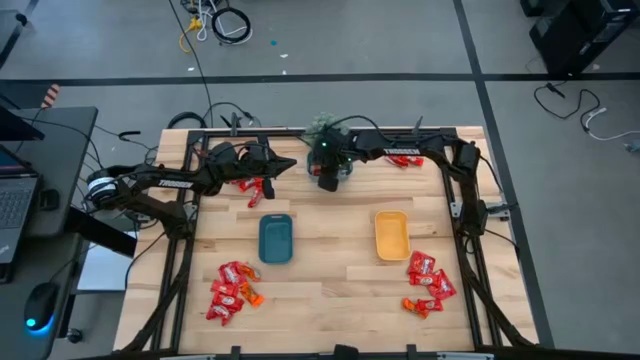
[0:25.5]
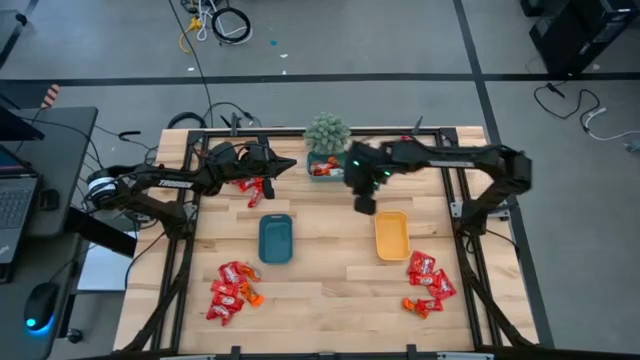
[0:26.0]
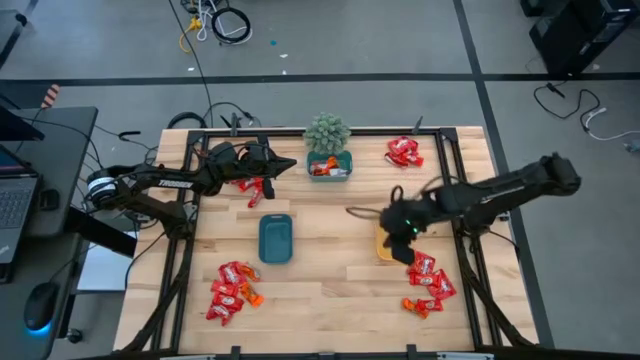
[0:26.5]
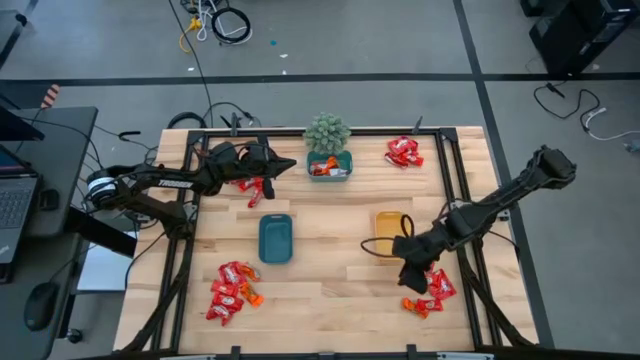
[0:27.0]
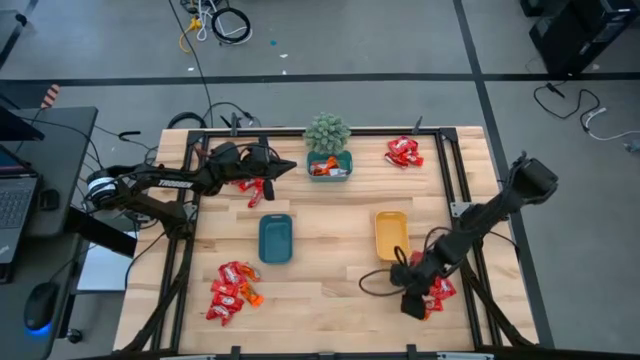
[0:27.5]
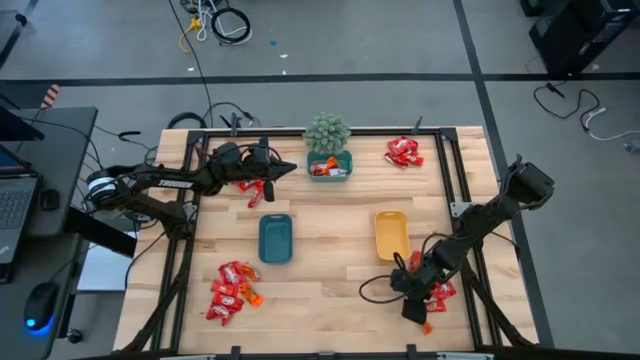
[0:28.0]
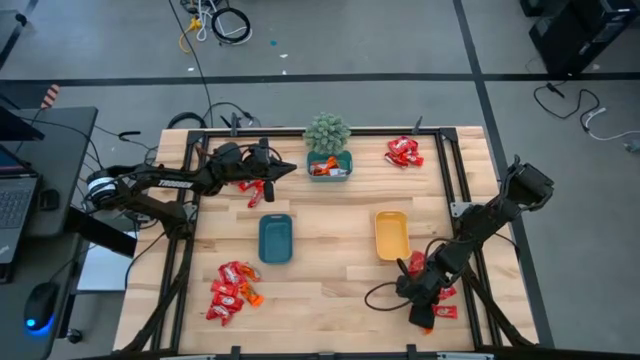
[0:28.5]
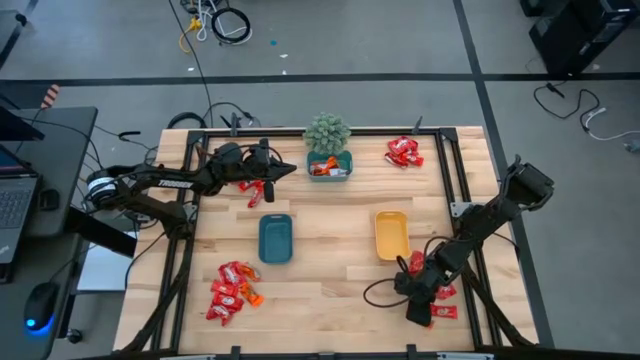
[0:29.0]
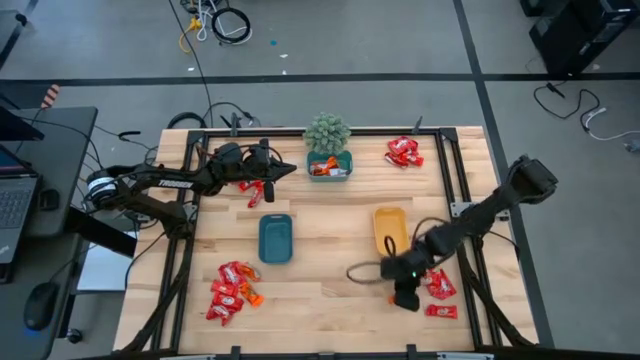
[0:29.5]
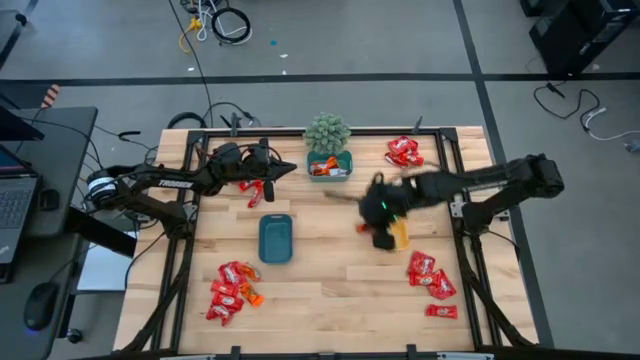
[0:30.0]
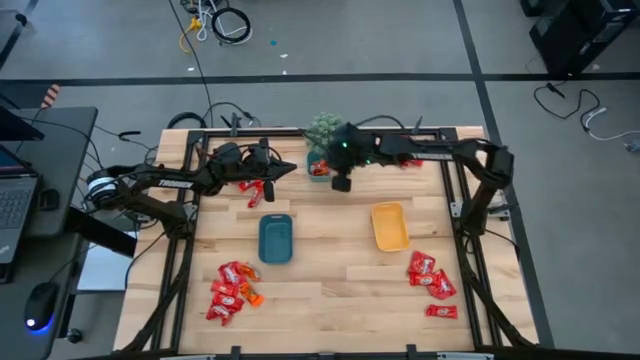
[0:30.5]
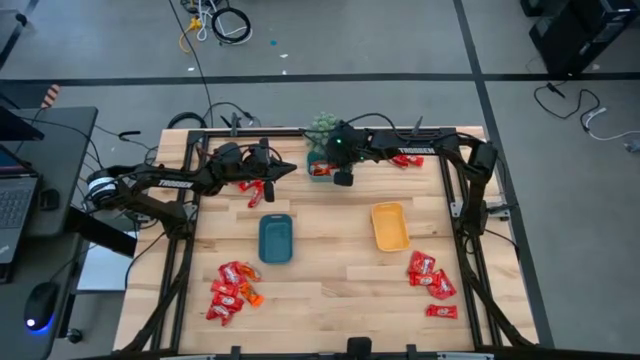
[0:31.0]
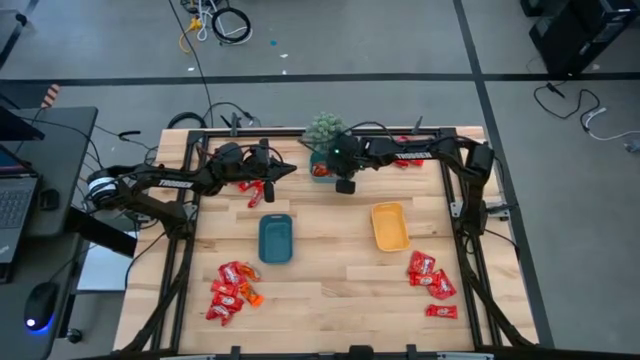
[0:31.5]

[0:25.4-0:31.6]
Task: Sort candy
Put the orange chocolate into the green bin

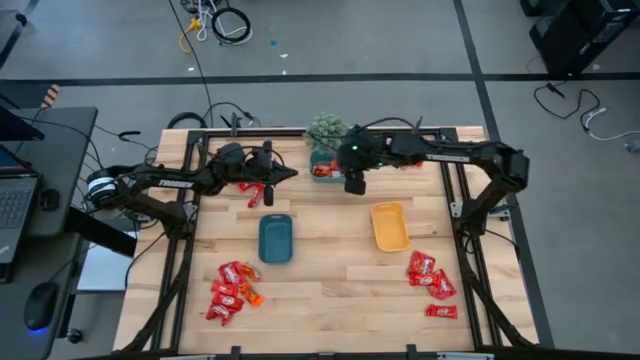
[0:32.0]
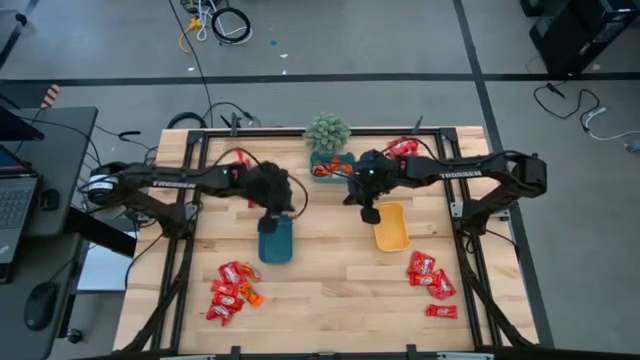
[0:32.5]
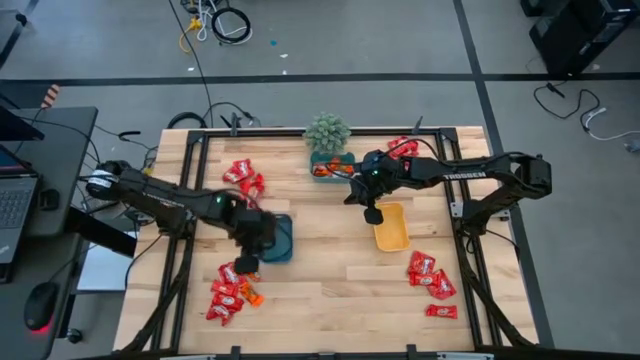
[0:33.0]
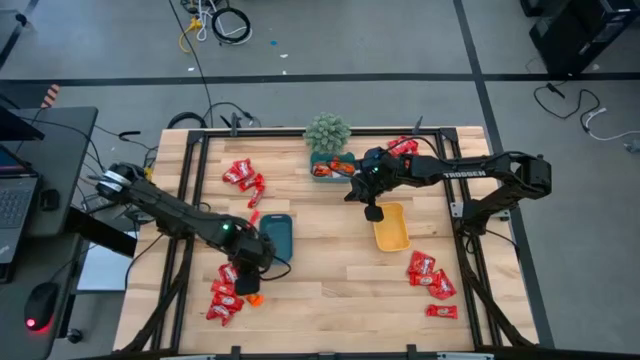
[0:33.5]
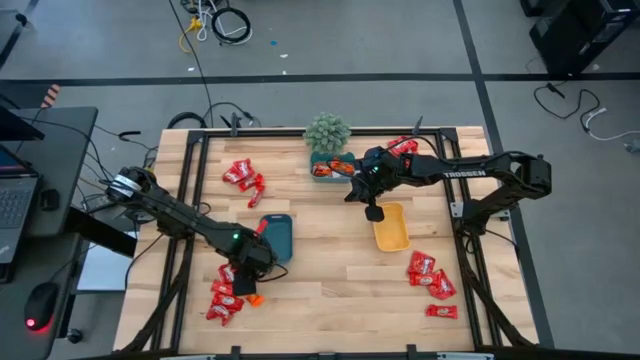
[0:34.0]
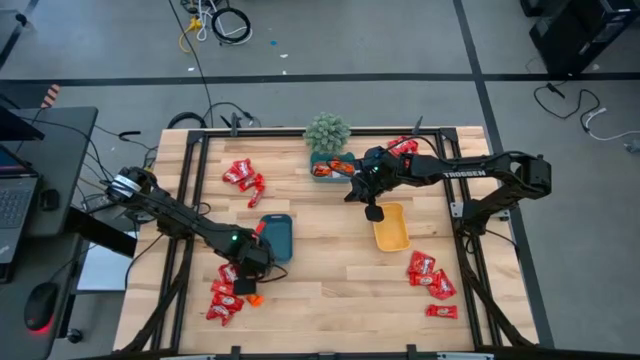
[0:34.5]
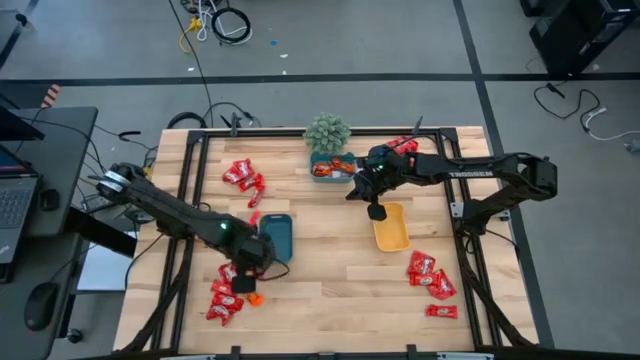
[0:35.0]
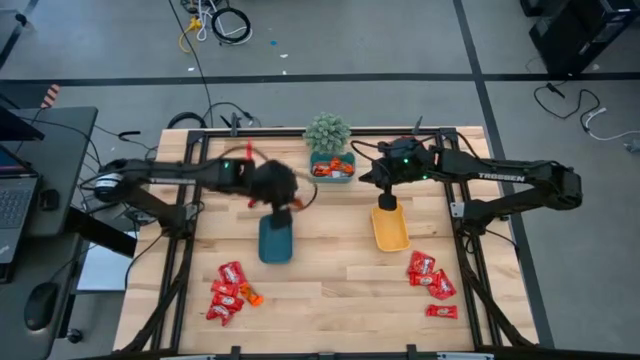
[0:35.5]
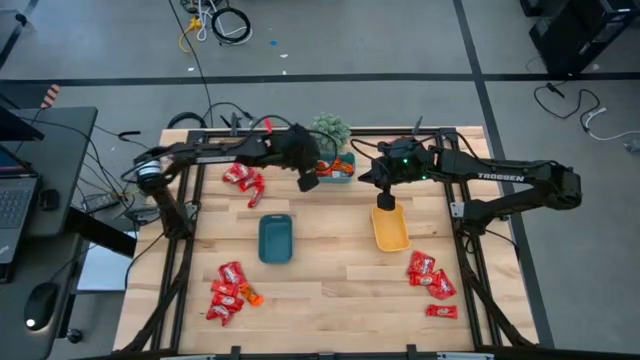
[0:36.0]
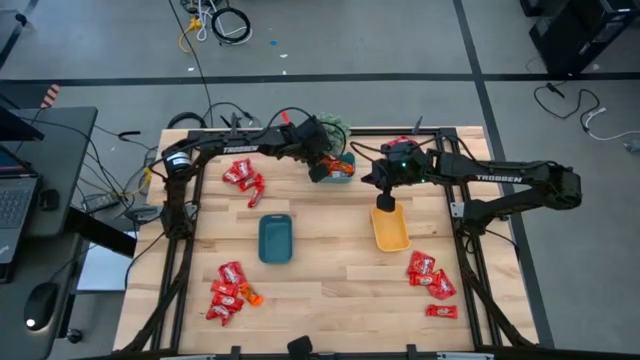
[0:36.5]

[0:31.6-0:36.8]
Put the orange chocolate into the green bin

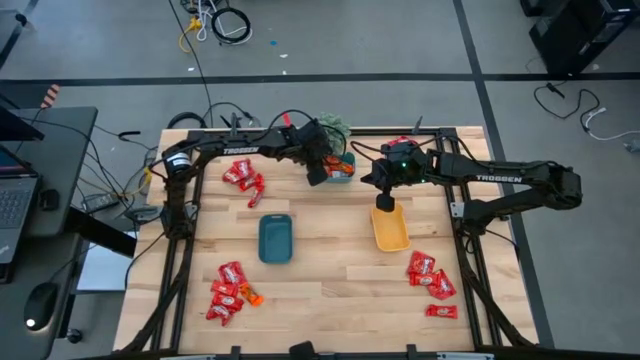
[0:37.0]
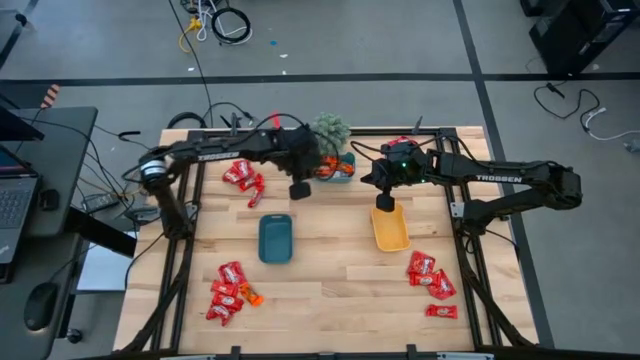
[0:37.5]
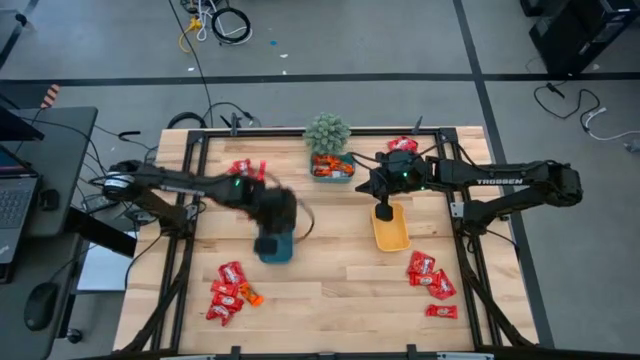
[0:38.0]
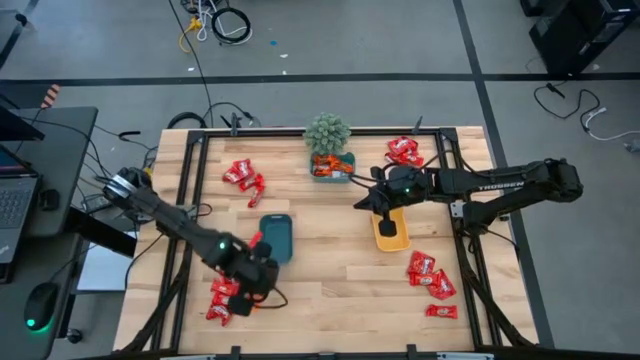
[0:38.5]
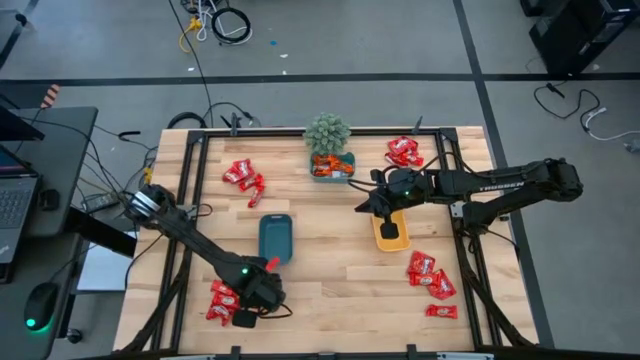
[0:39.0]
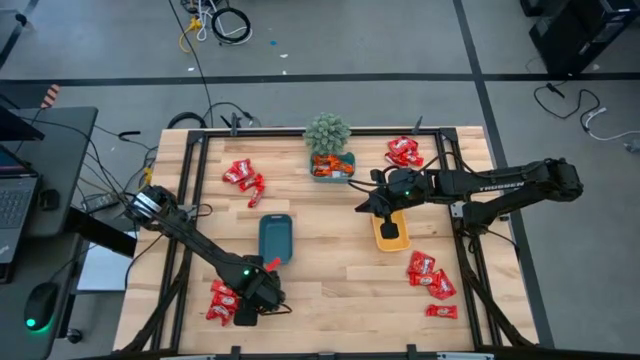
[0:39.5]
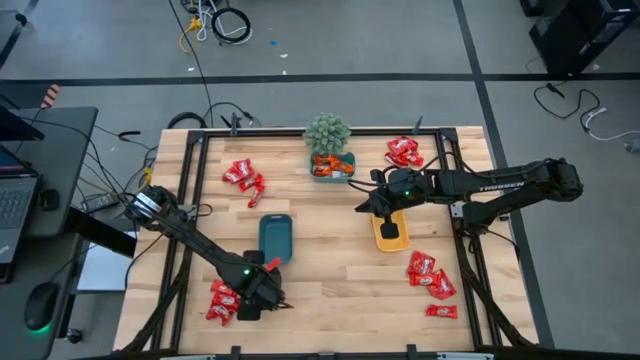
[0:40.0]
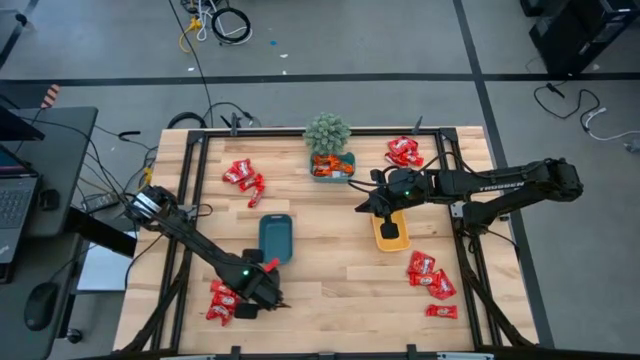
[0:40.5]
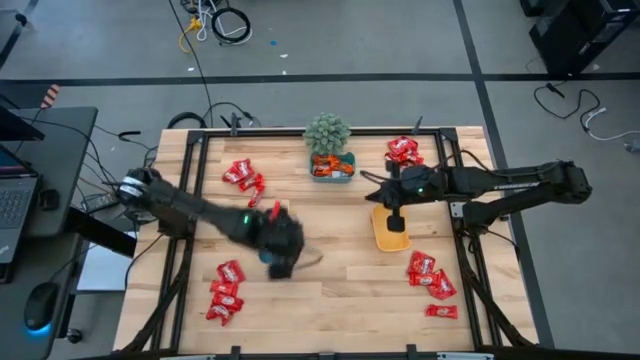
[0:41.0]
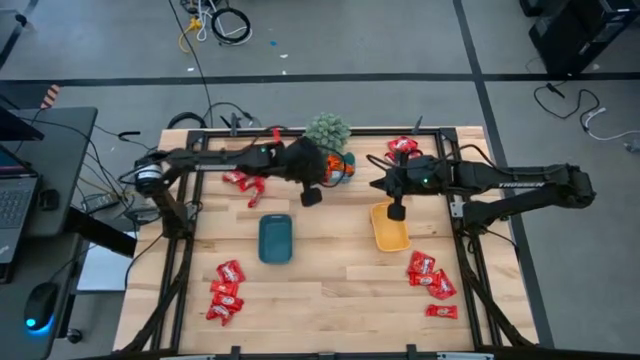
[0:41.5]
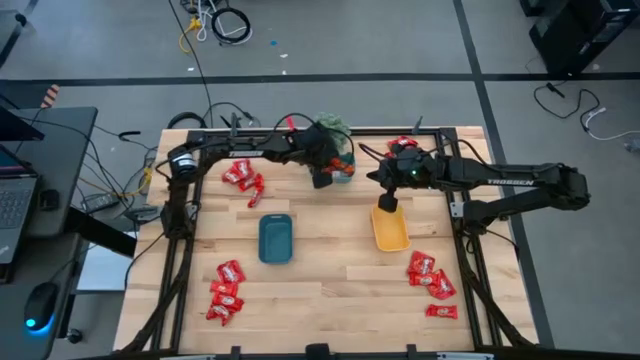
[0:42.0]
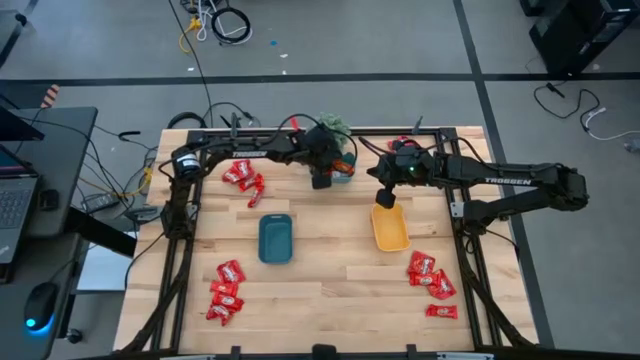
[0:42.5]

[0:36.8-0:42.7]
Put the orange chocolate into the green bin

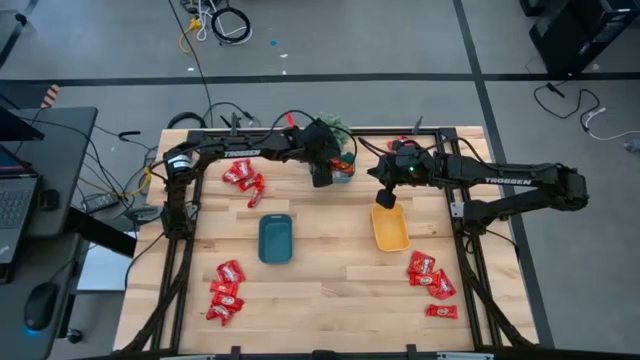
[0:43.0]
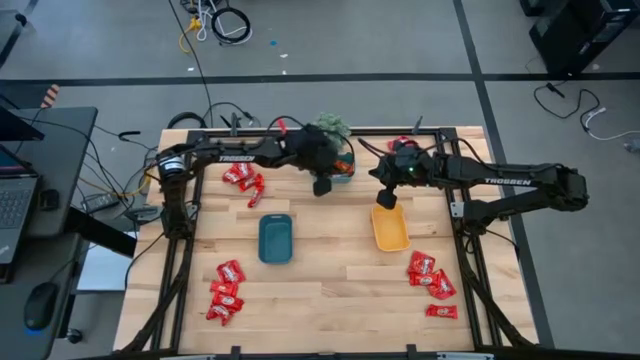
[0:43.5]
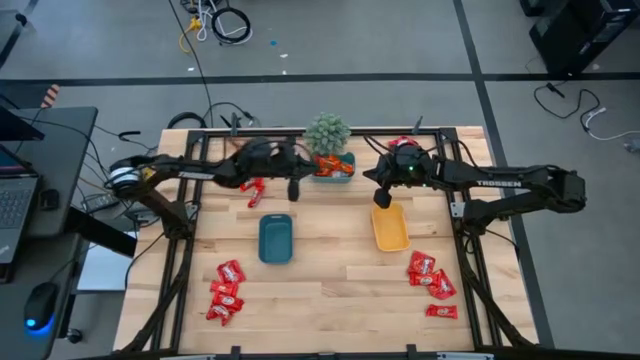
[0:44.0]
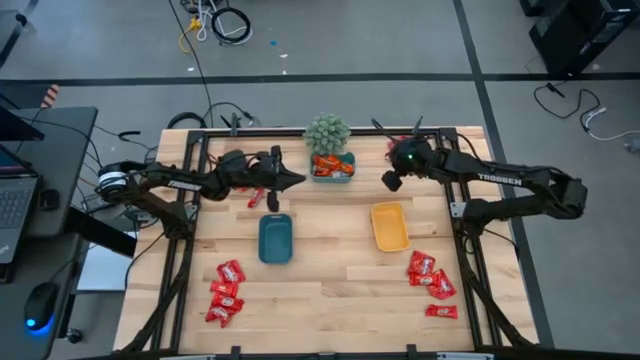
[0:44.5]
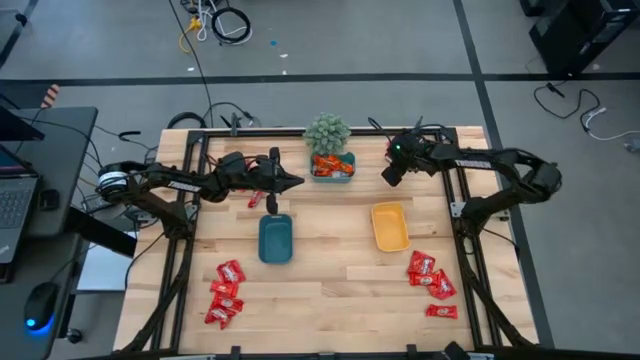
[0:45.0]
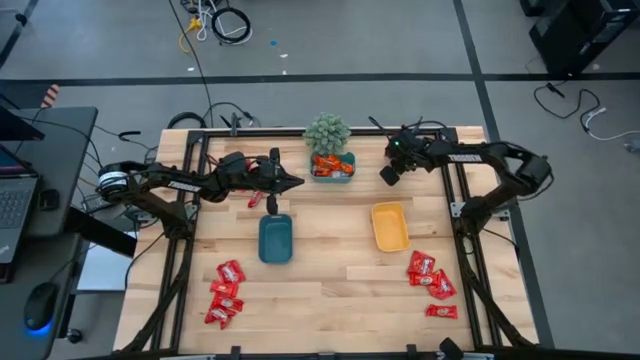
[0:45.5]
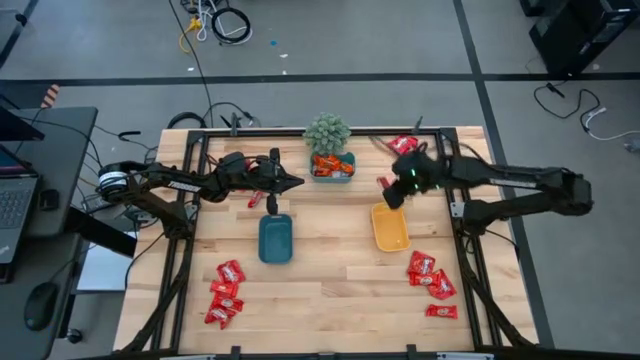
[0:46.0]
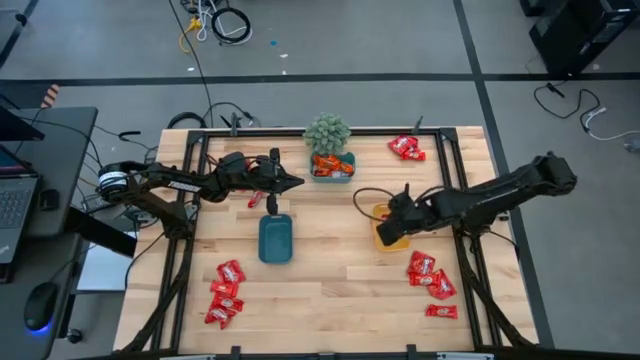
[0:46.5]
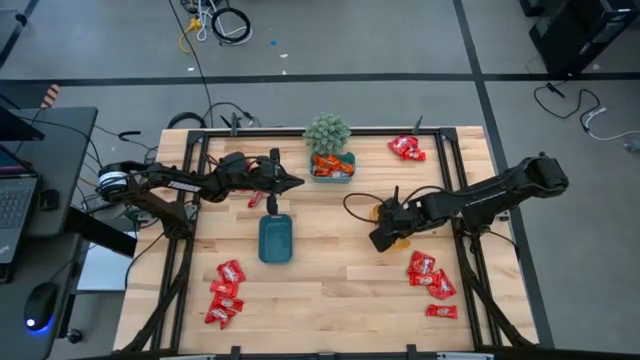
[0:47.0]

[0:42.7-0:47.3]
Put the red chocolate into the yellow bin
